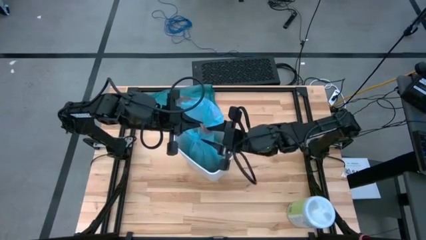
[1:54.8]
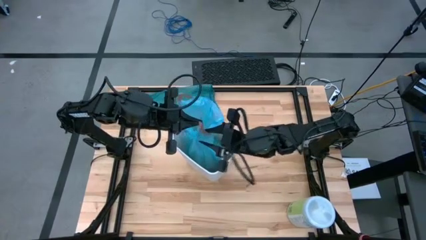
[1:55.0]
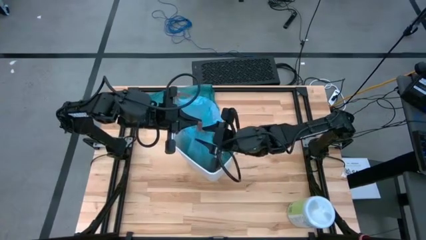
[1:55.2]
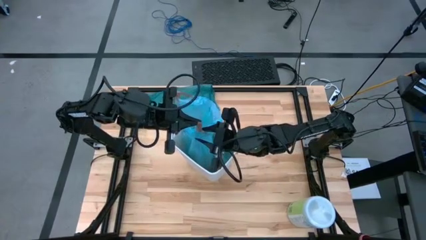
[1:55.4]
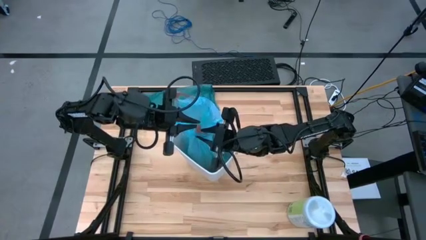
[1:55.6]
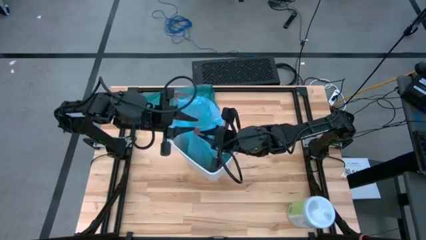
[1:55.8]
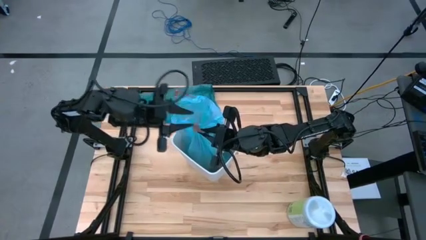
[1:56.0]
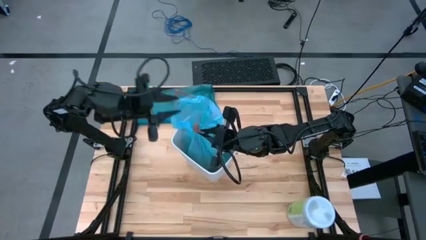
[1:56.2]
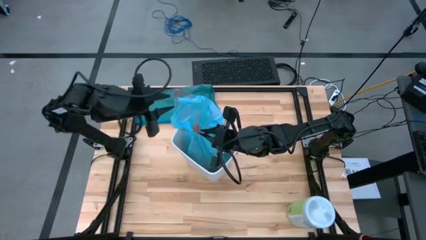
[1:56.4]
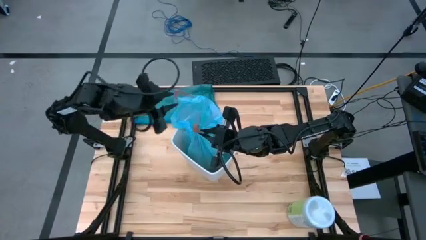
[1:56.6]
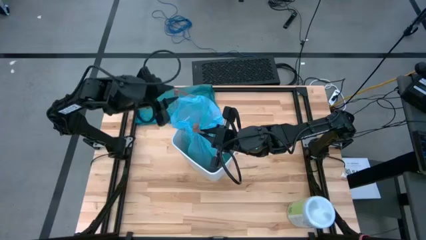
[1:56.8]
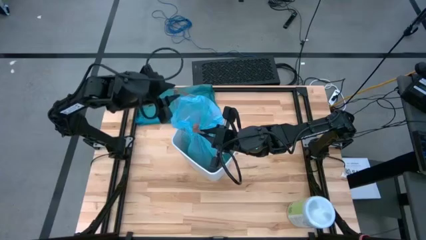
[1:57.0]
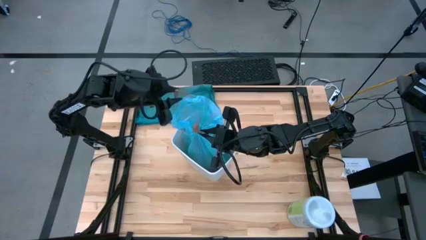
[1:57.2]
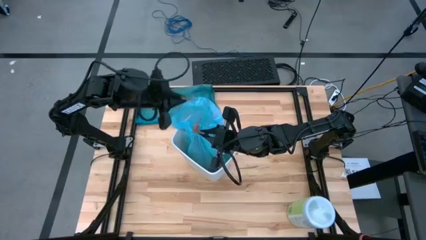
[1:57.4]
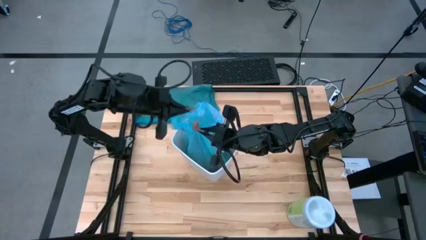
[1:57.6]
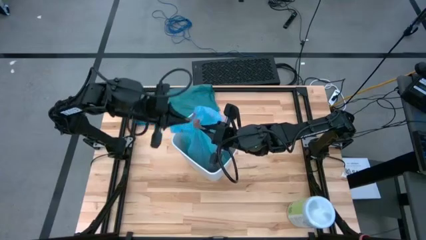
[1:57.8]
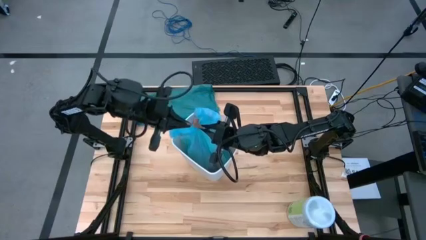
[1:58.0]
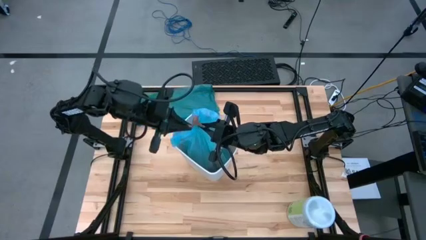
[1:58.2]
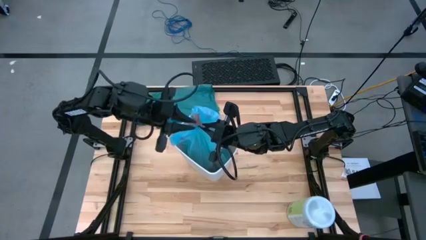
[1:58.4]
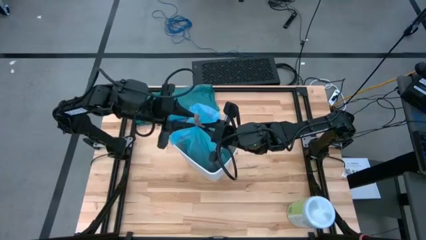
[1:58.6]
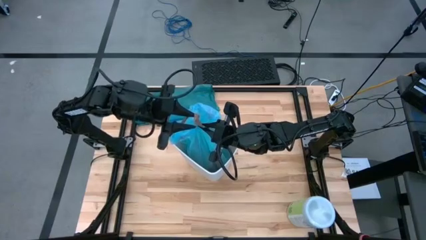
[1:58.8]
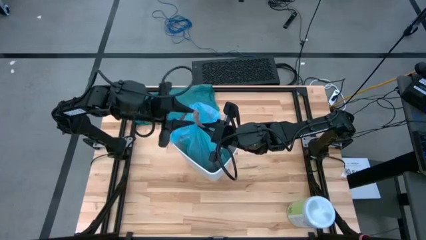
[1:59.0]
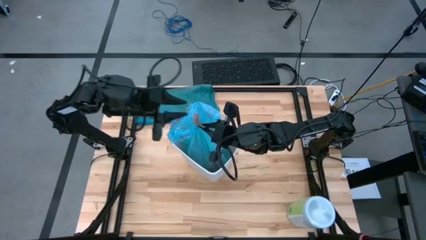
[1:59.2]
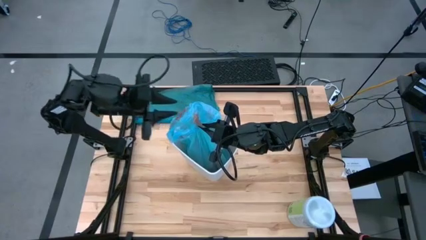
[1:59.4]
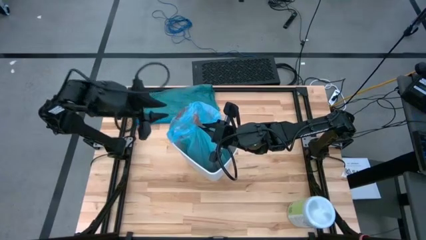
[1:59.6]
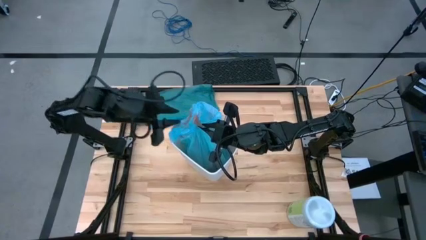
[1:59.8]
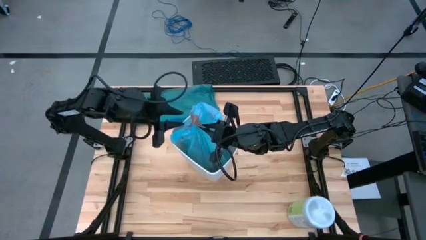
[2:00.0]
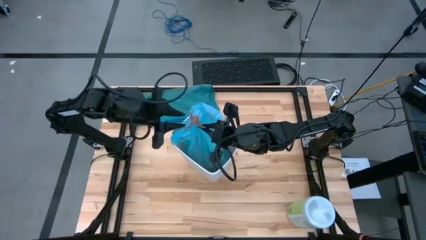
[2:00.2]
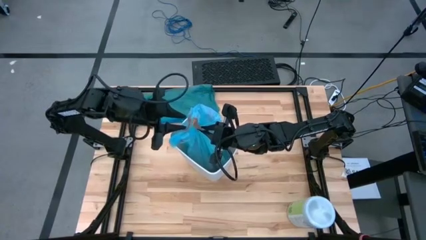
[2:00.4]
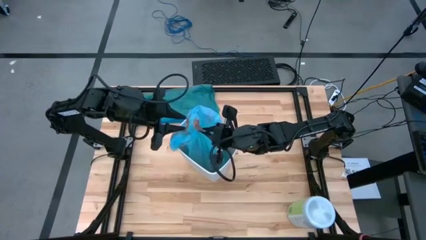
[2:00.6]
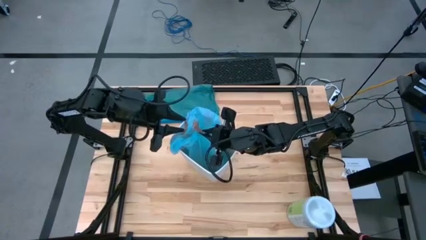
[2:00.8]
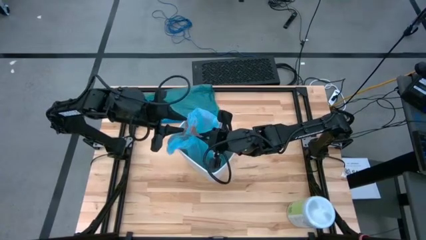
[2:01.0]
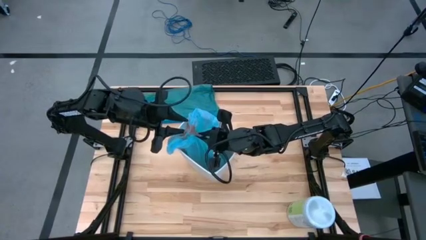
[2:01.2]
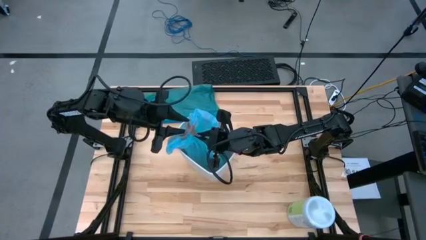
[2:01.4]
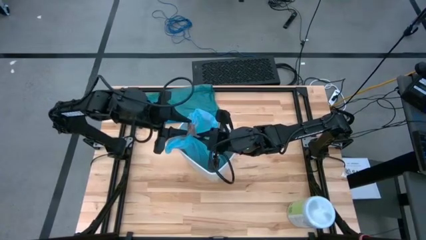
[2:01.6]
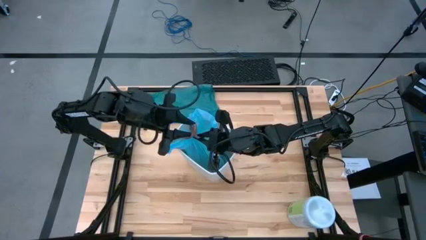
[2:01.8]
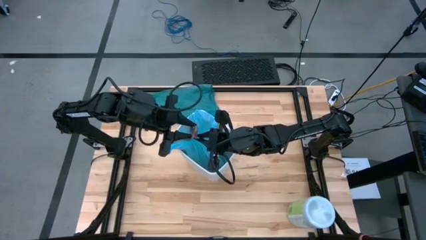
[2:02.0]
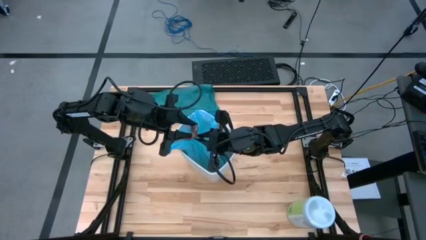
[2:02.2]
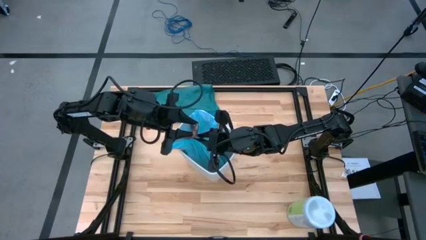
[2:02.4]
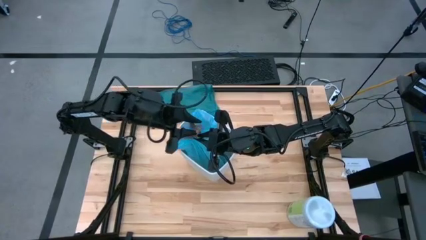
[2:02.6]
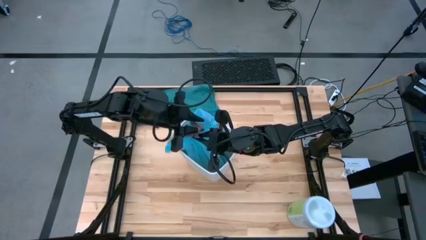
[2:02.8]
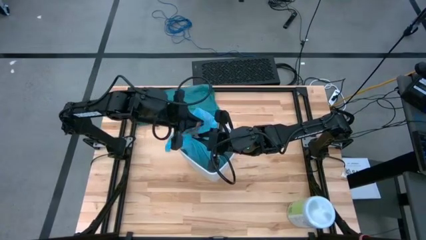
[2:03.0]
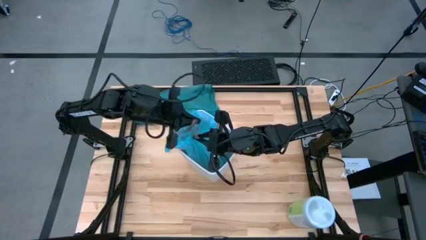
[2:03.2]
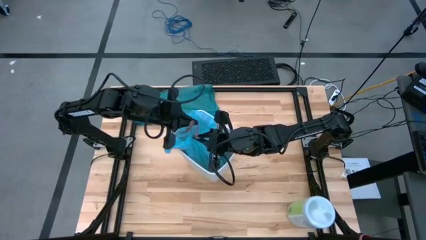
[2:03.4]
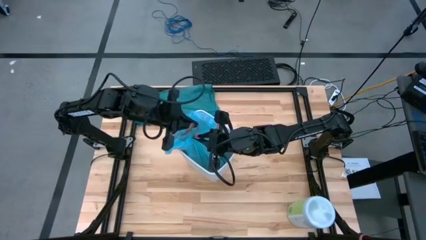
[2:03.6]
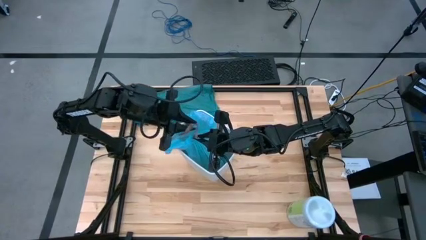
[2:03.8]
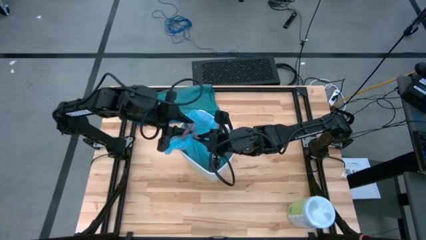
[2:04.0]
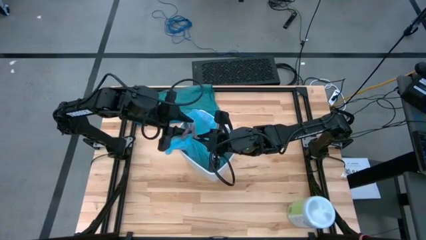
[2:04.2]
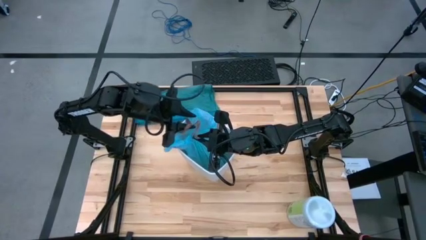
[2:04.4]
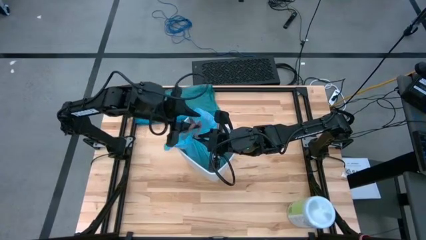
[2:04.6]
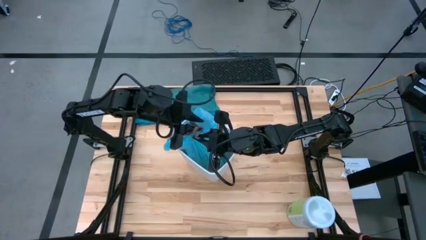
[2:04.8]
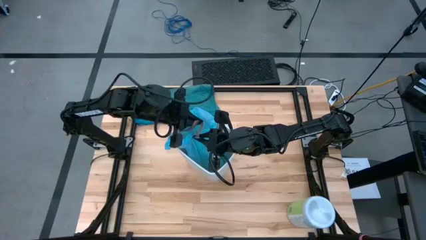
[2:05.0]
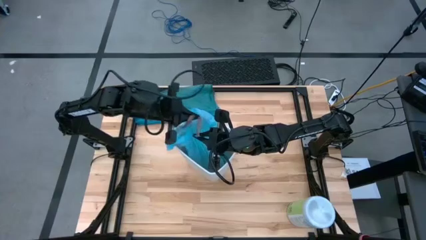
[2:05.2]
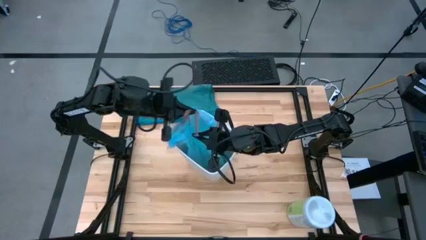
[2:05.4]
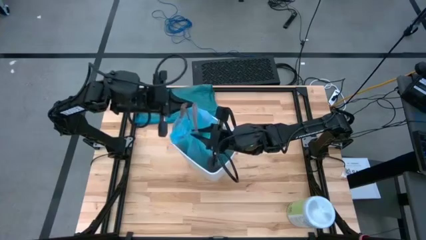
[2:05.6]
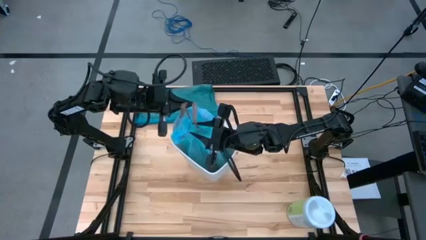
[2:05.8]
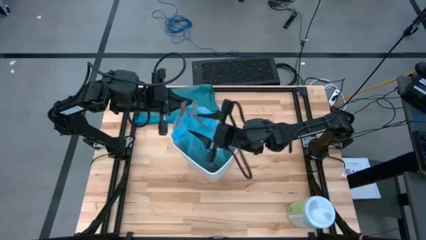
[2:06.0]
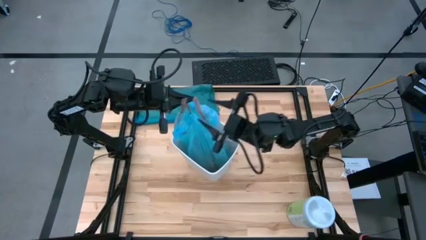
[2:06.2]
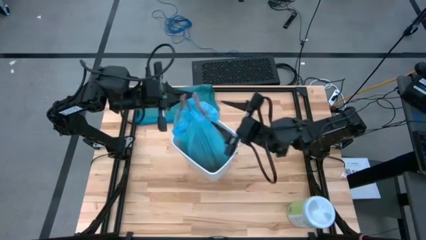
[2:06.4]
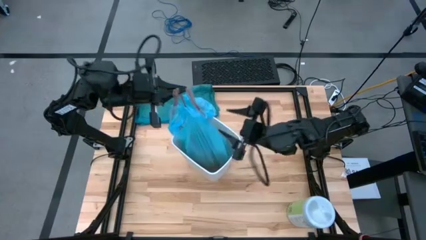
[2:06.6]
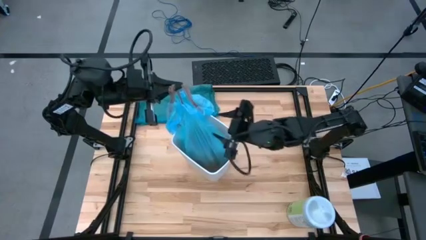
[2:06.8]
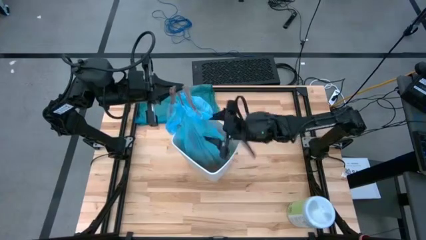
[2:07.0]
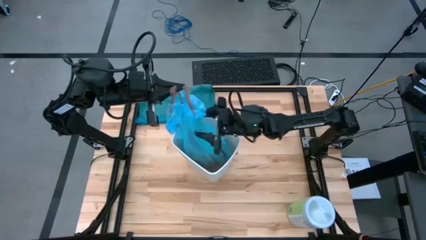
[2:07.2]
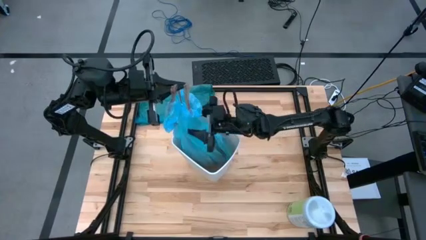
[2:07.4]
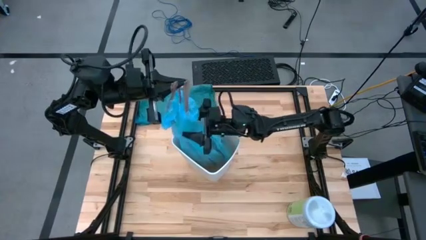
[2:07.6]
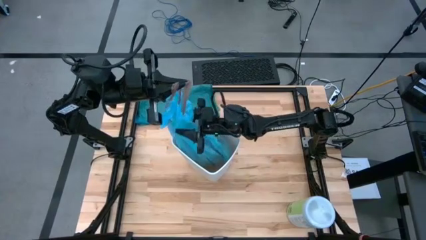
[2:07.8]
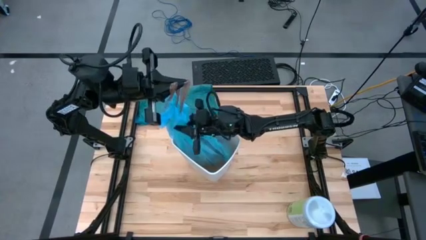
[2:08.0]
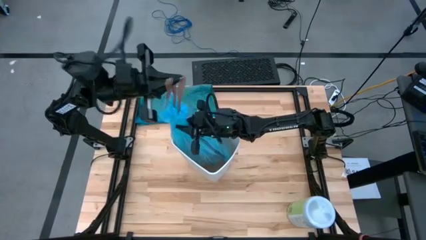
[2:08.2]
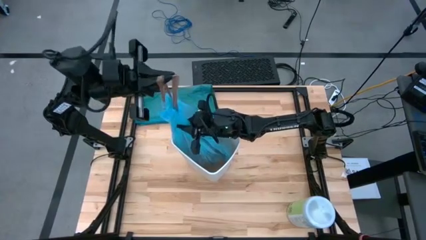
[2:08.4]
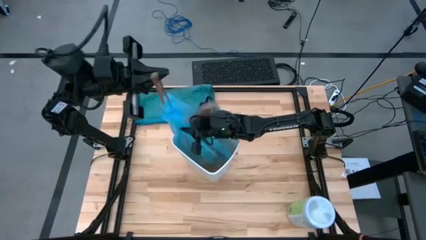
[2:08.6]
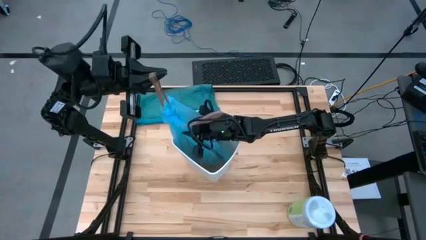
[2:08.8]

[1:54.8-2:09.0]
Task: place trash/remove bag and relplace
Remove the blue trash bag from the bin

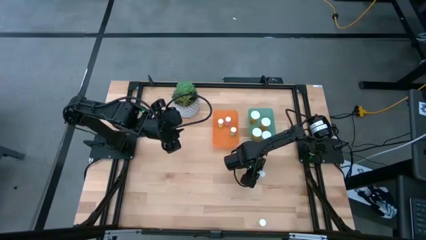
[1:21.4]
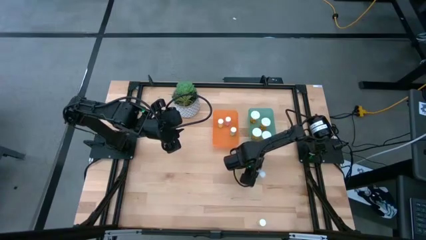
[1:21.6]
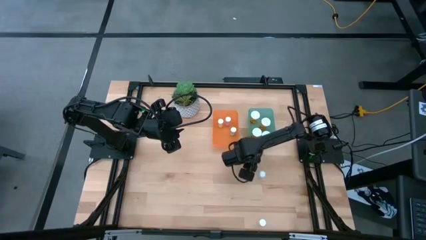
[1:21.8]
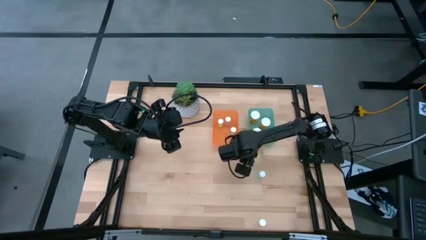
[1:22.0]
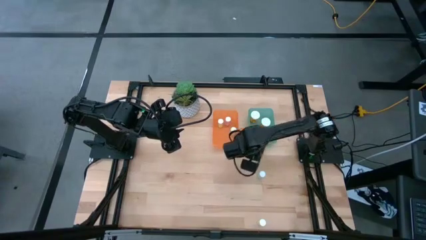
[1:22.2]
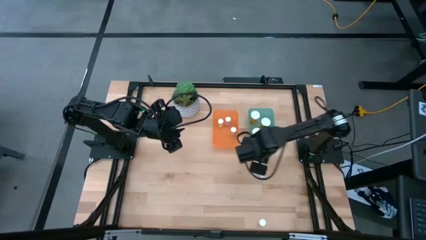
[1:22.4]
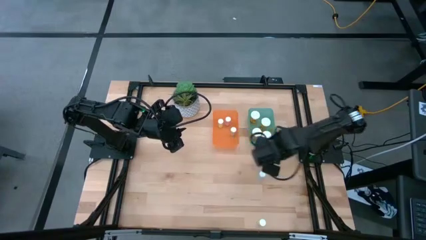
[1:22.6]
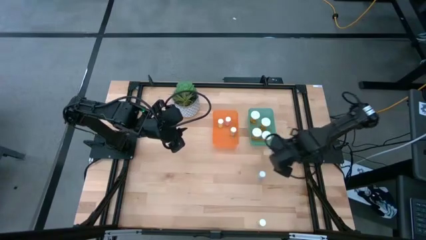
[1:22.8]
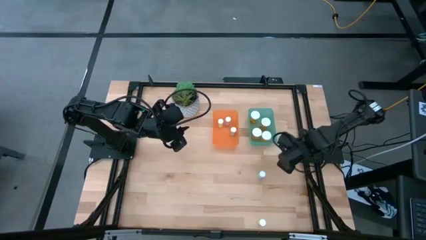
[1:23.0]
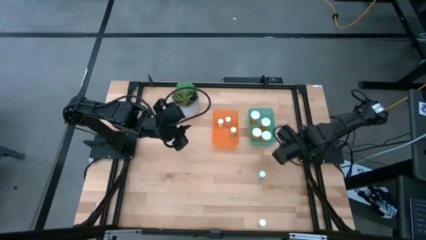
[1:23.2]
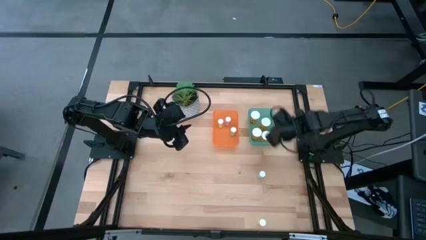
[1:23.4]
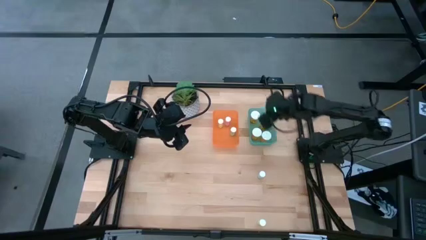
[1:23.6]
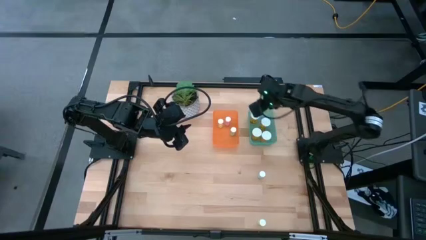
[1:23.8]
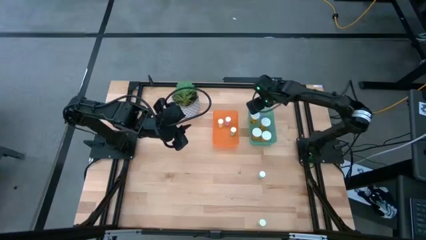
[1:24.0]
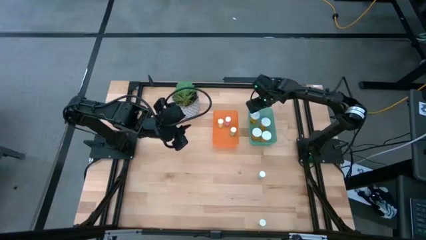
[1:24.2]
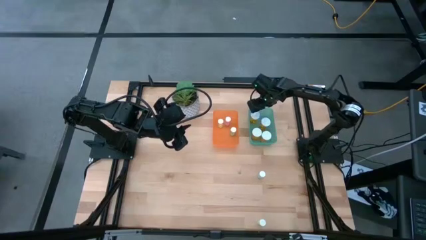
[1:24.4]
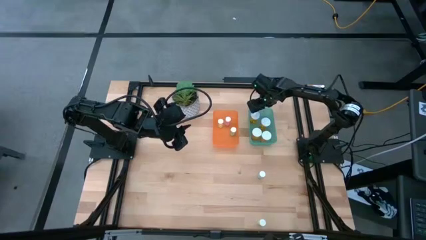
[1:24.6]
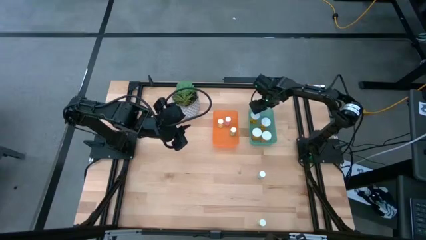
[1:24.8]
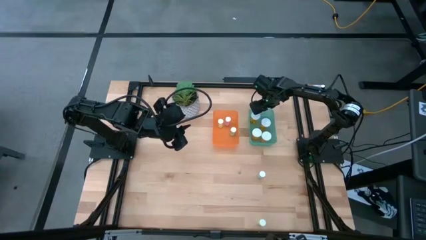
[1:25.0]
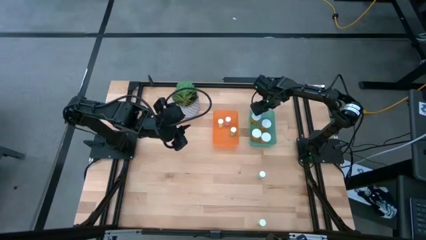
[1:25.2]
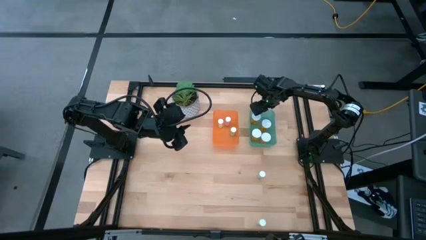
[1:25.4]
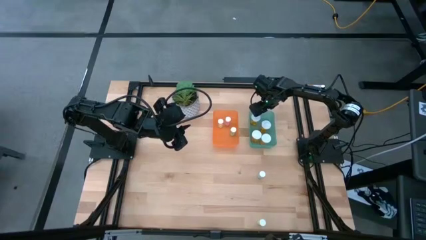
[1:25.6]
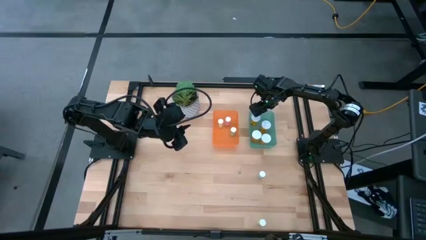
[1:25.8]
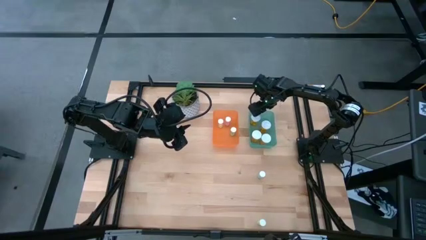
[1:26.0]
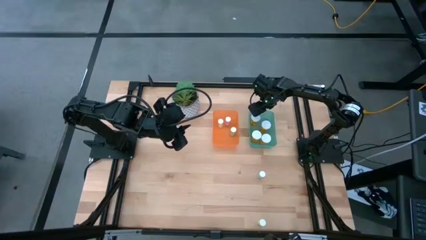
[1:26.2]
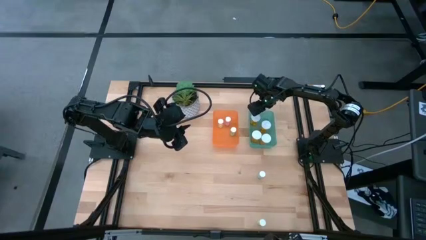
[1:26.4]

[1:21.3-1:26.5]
Task: Pick and place medicine bottles into bin by pill shape (circle, oval)
Adjust the green bin
